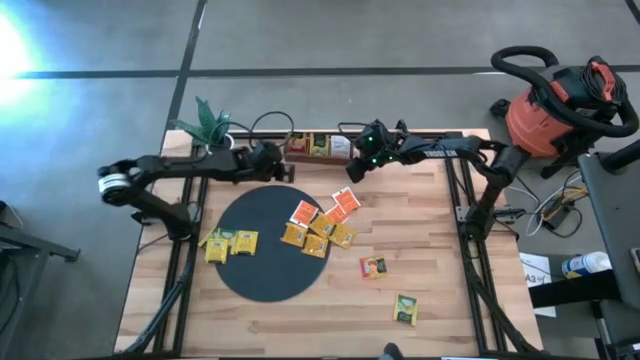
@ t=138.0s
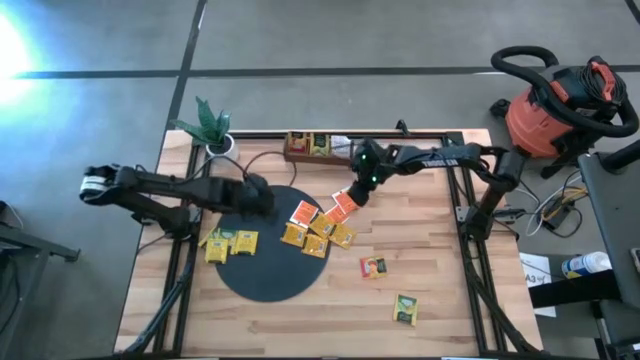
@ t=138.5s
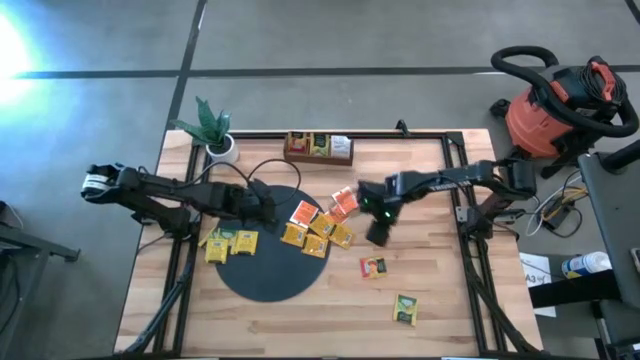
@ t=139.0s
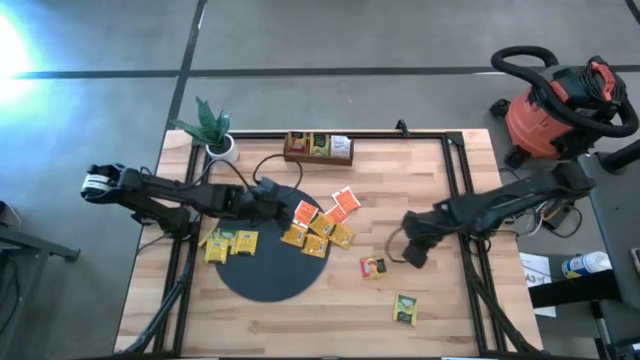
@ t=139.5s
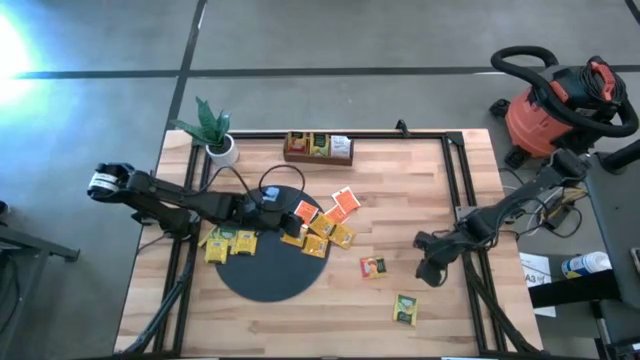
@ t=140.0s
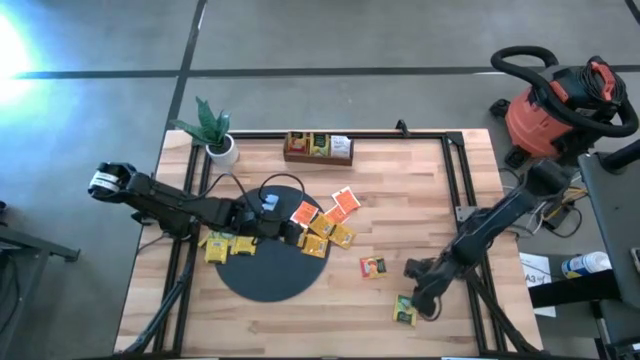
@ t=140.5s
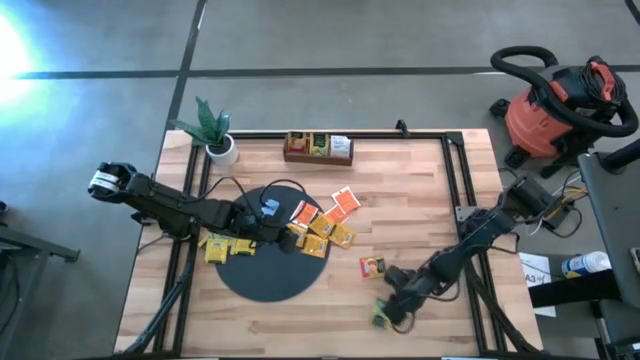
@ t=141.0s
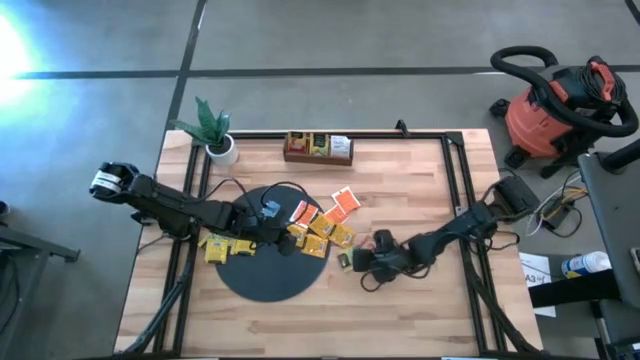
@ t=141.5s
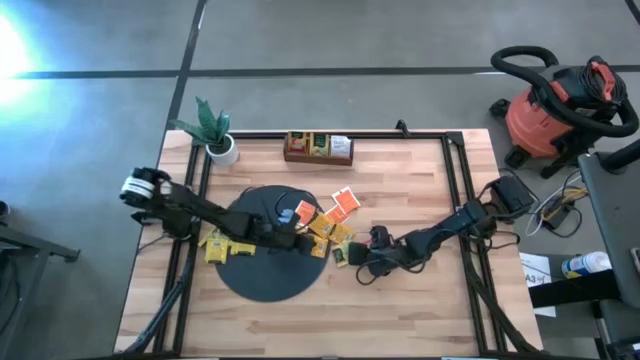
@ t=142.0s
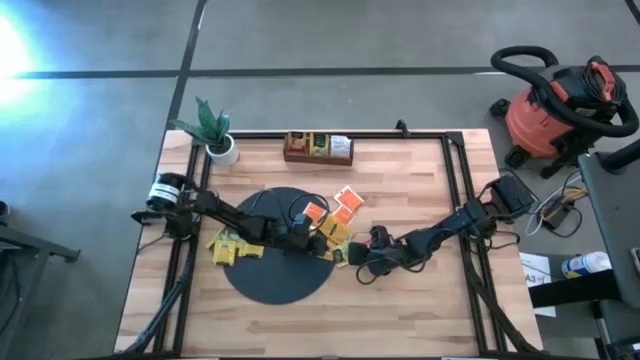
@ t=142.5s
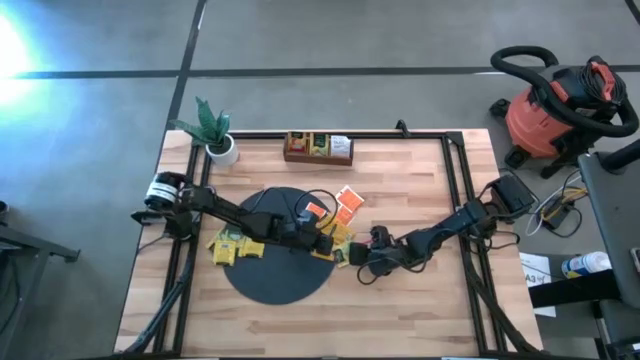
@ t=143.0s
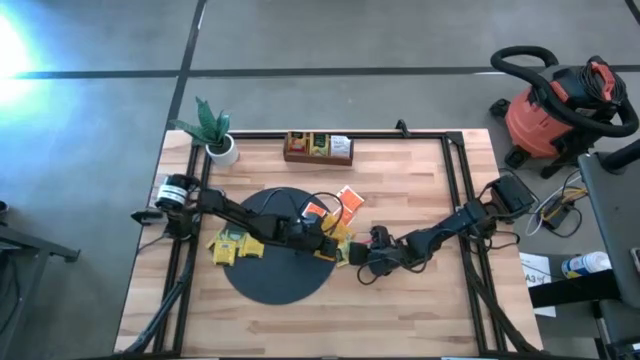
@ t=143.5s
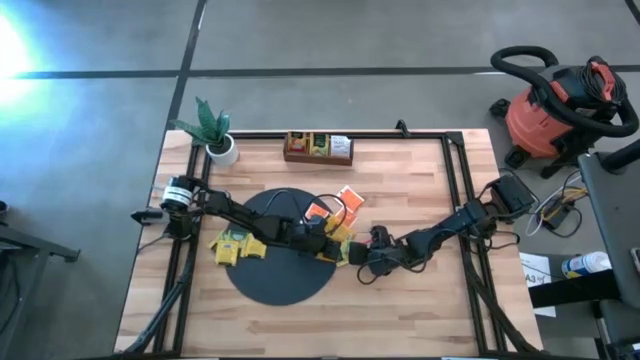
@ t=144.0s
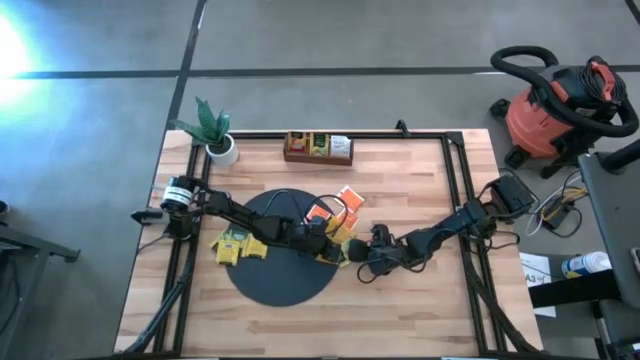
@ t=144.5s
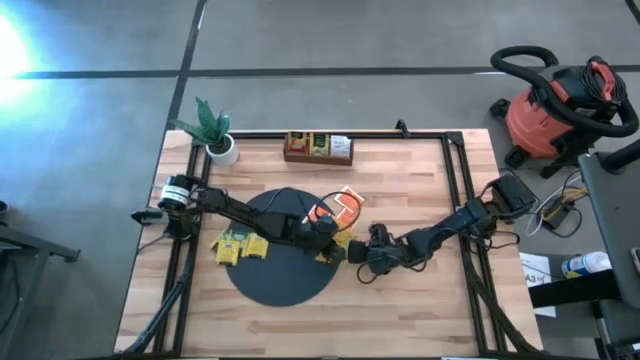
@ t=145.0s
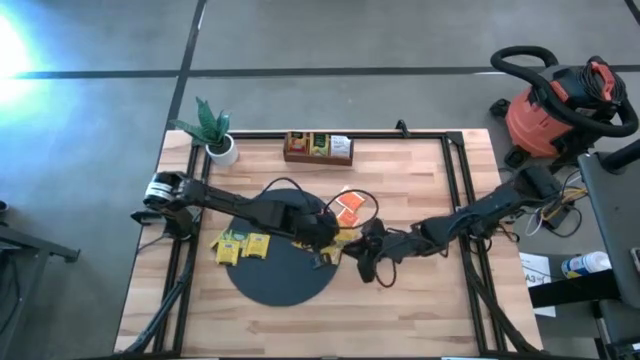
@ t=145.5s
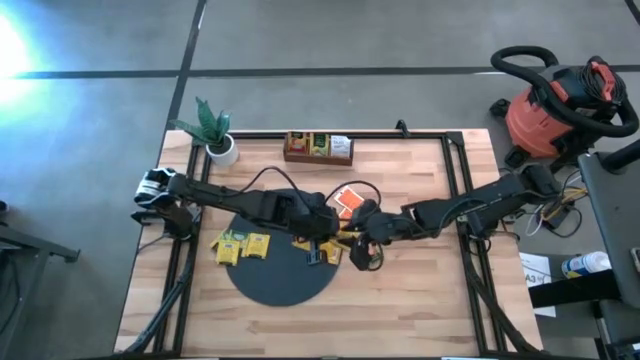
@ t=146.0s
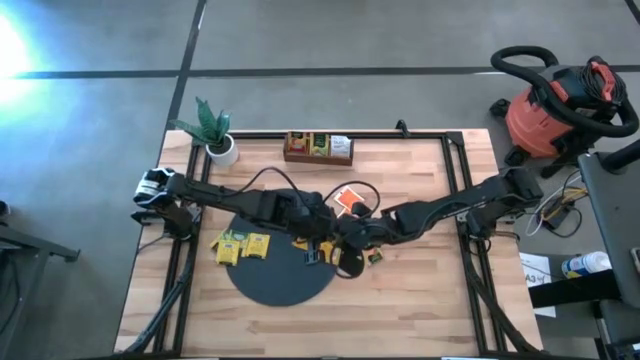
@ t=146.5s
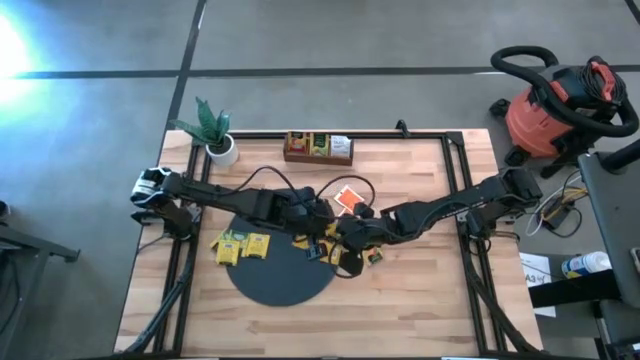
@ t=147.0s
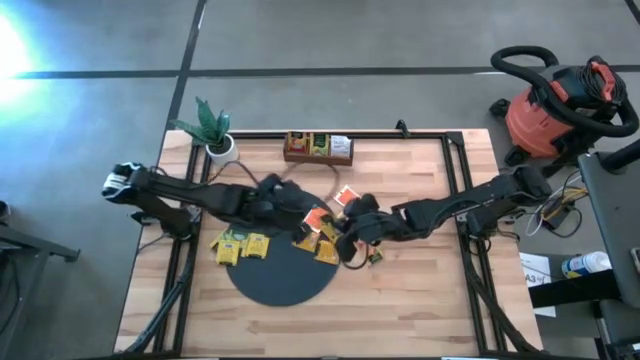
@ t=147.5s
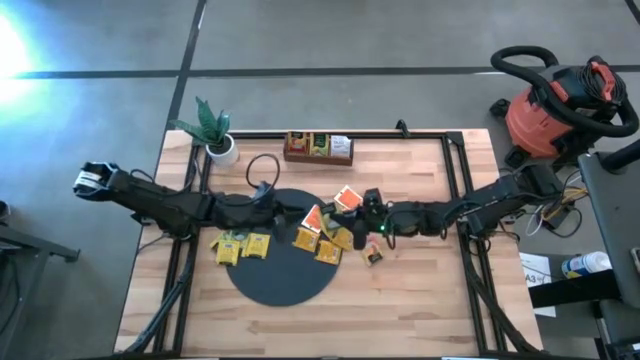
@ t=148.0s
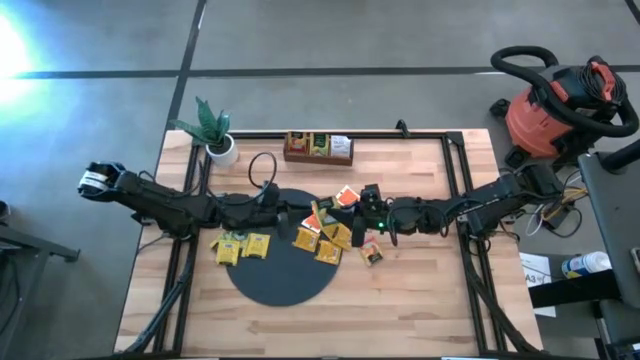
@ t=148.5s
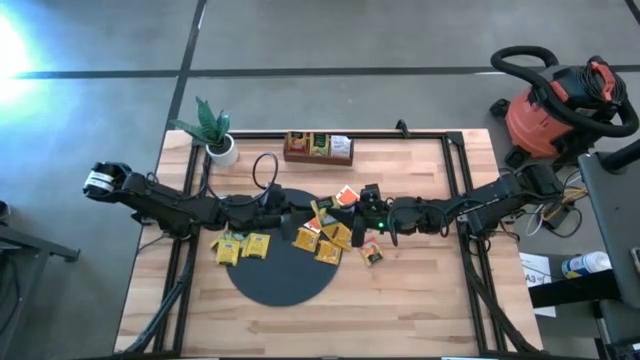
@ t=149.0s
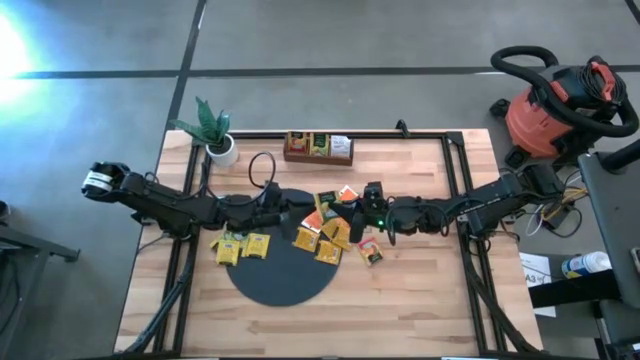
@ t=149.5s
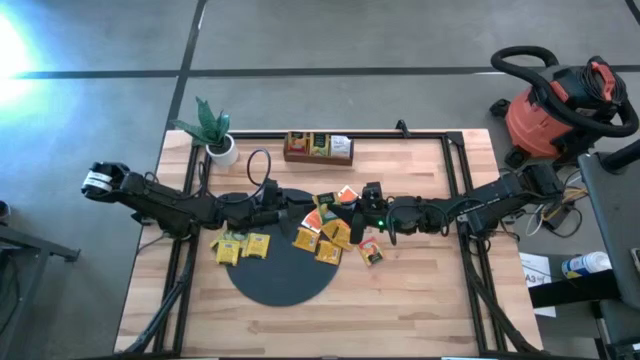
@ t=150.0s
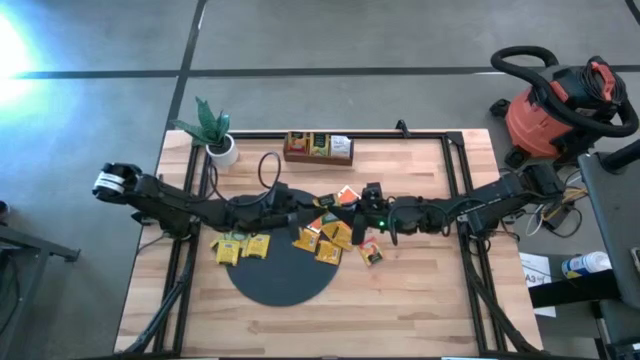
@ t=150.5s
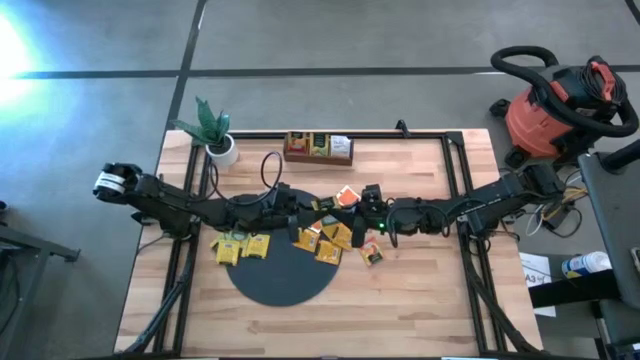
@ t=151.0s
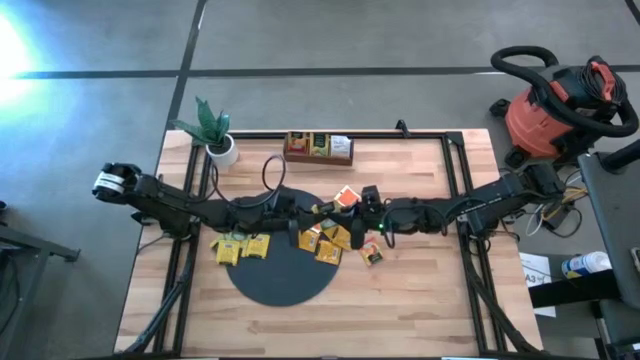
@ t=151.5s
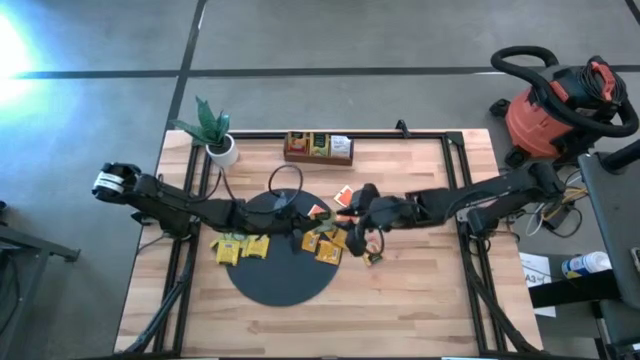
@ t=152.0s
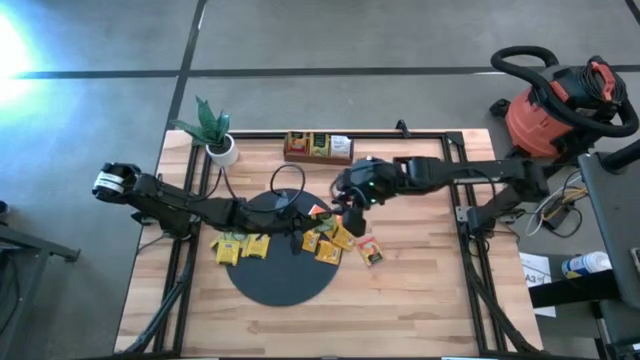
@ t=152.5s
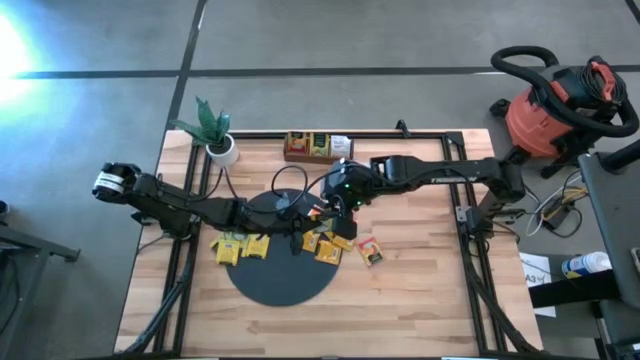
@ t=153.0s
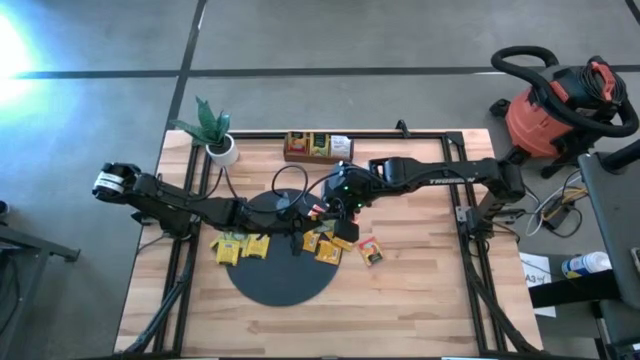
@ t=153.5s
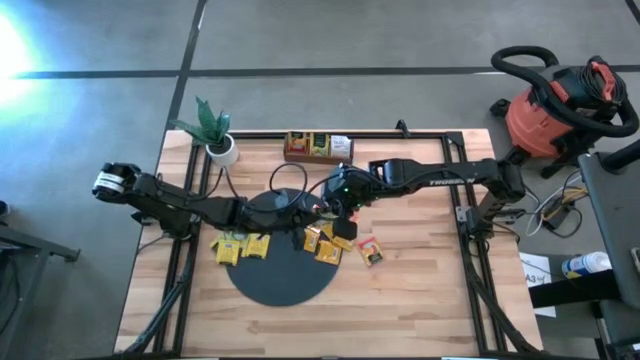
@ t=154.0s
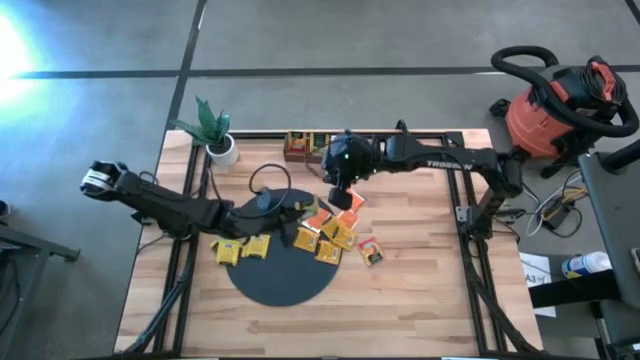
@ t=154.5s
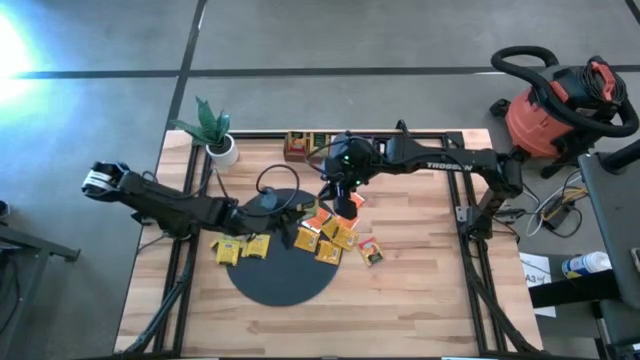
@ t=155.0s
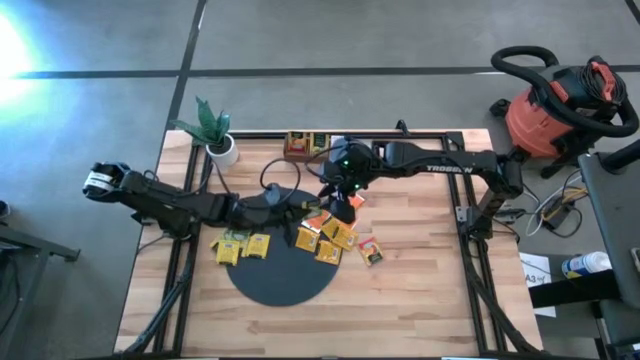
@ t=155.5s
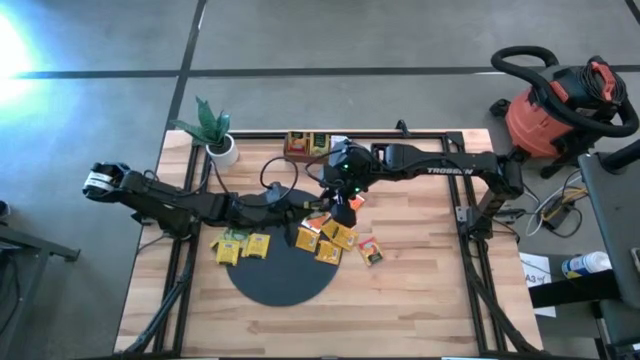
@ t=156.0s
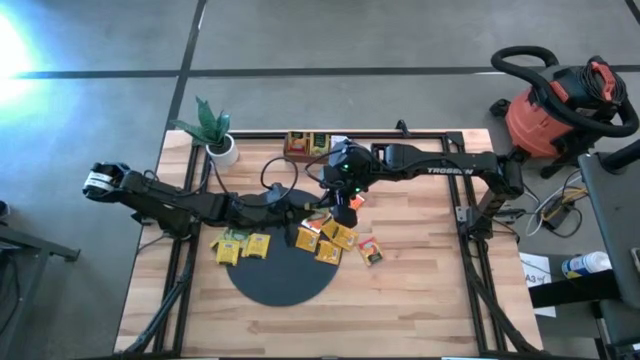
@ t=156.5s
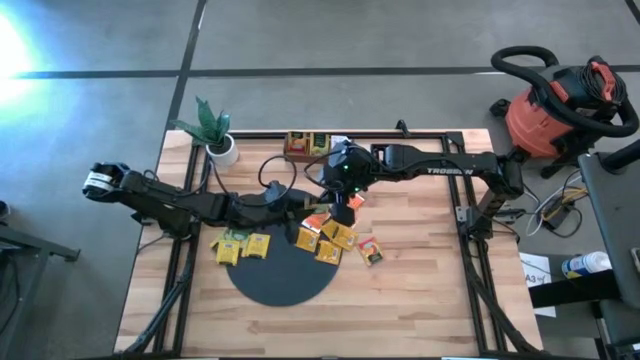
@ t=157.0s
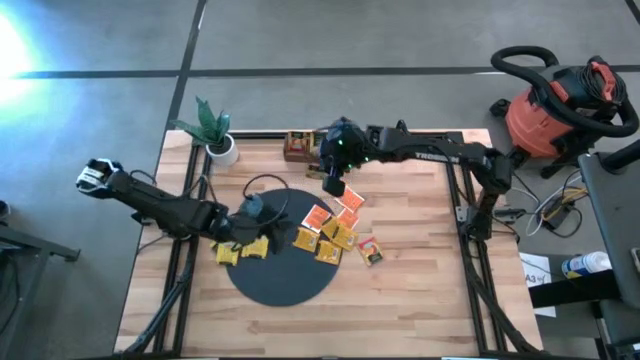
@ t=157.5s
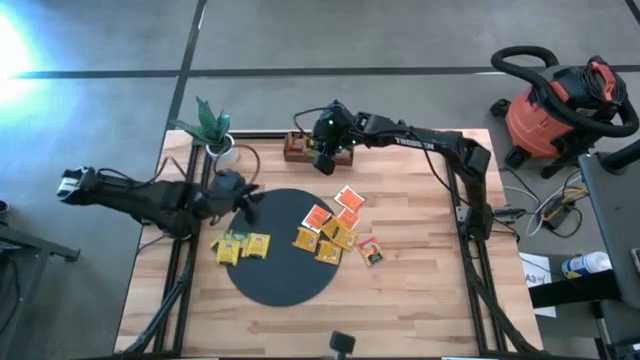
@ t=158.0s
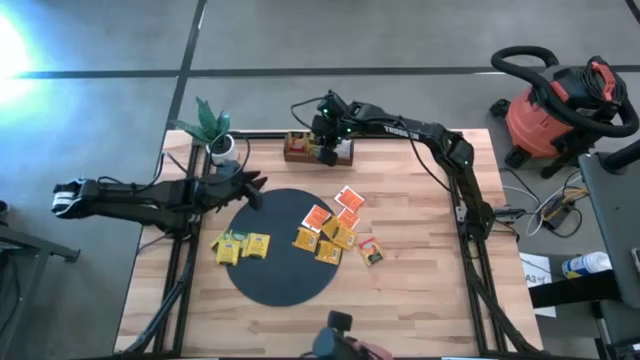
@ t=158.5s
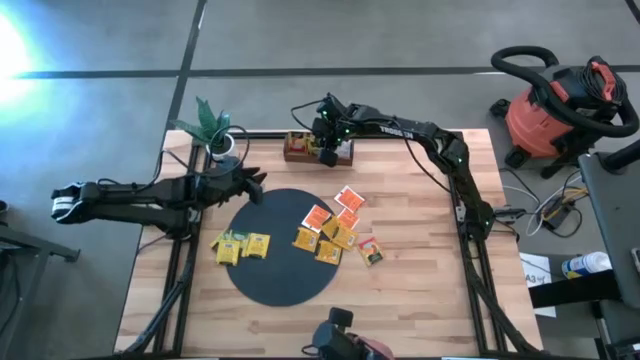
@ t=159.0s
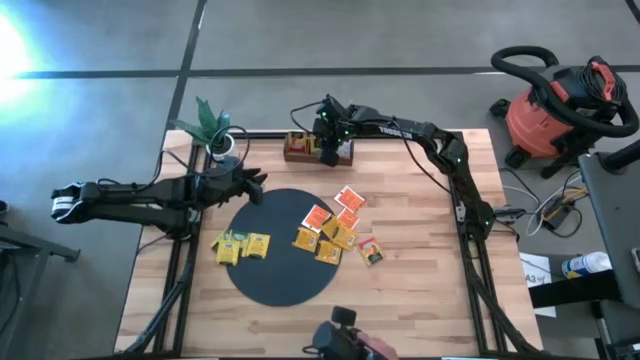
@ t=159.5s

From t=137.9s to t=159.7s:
Task: Pick & Place Tea
Put the yellow tea bag into the middle section of the wooden organizer
